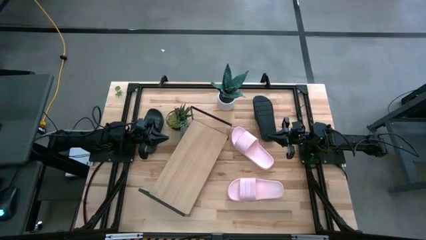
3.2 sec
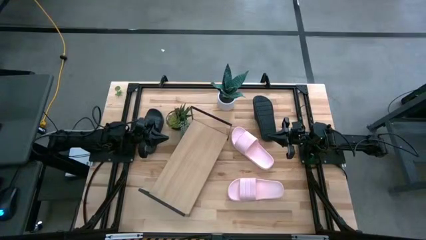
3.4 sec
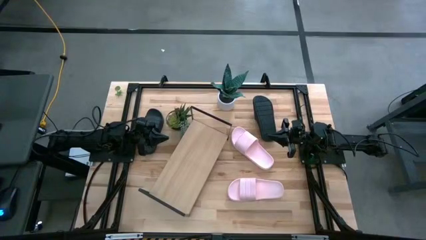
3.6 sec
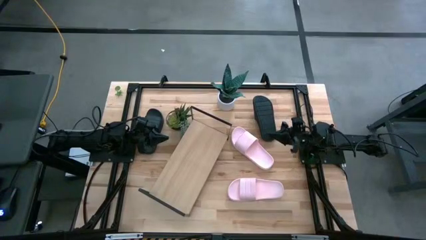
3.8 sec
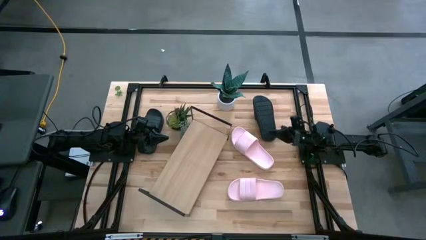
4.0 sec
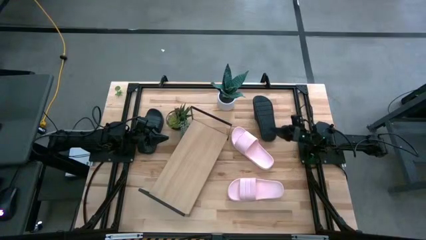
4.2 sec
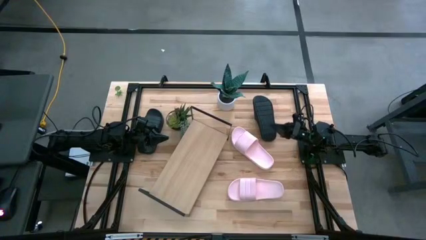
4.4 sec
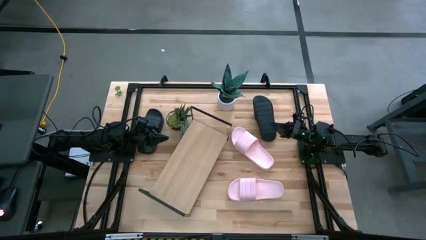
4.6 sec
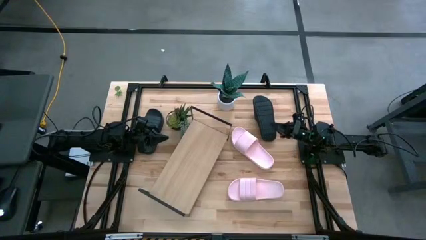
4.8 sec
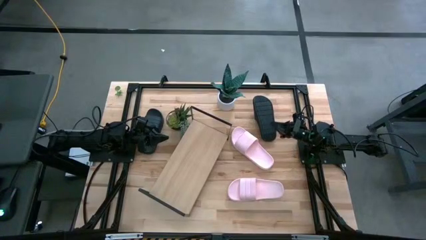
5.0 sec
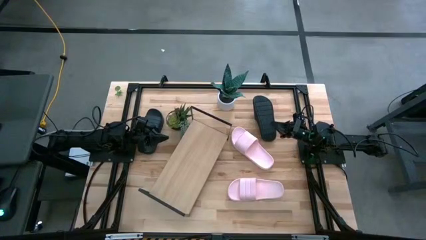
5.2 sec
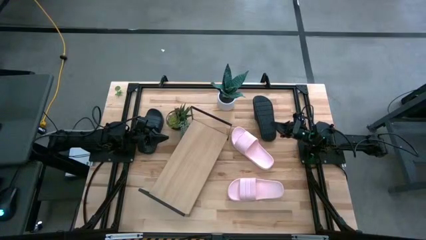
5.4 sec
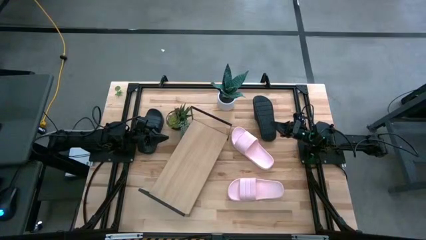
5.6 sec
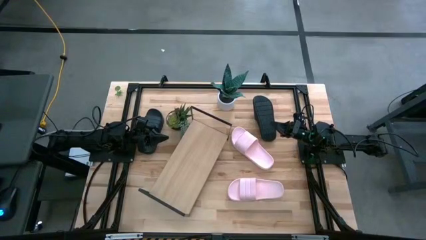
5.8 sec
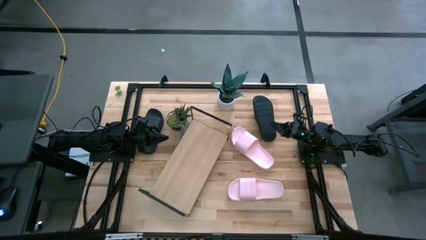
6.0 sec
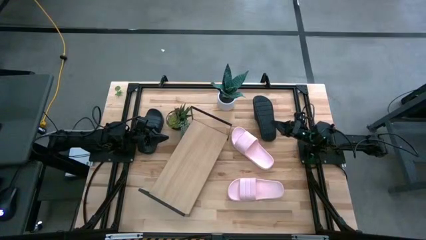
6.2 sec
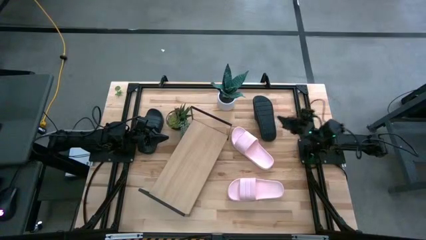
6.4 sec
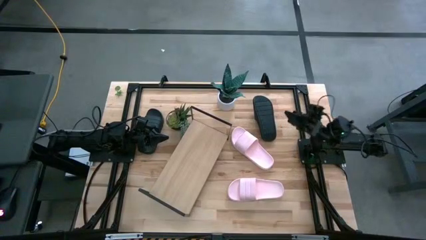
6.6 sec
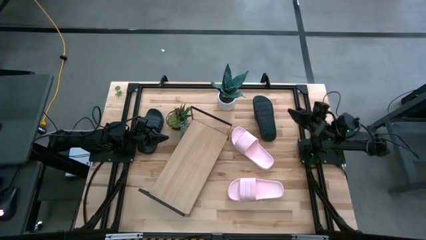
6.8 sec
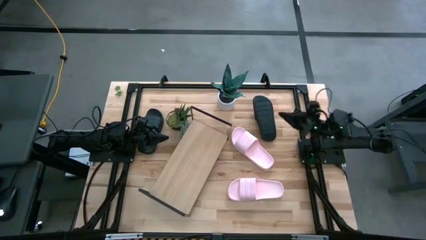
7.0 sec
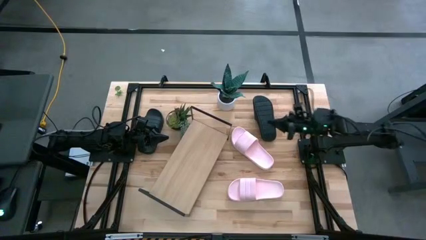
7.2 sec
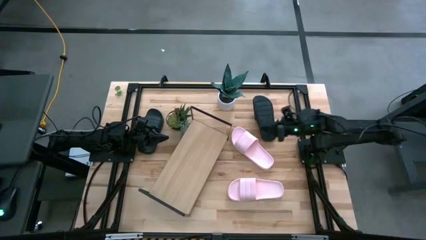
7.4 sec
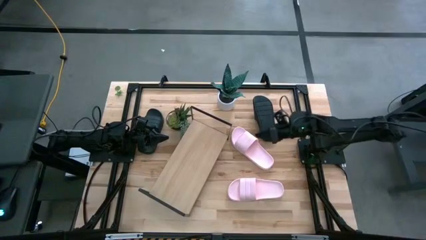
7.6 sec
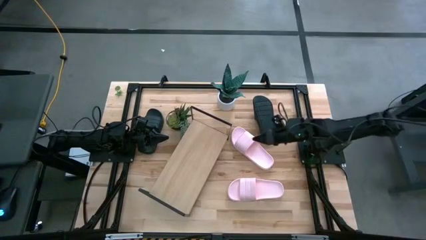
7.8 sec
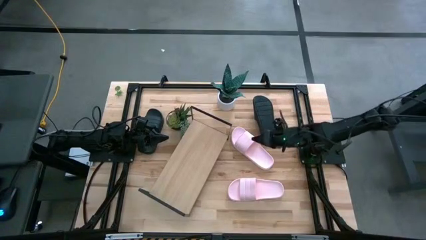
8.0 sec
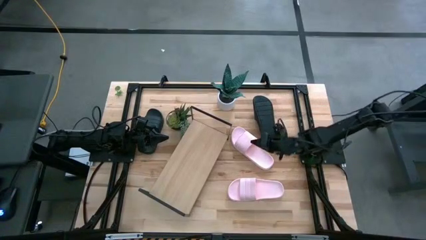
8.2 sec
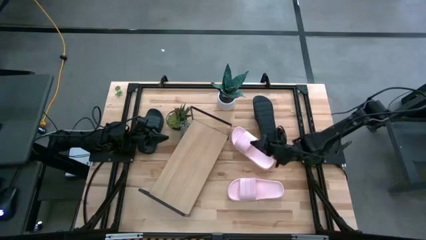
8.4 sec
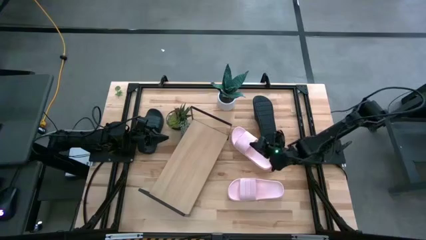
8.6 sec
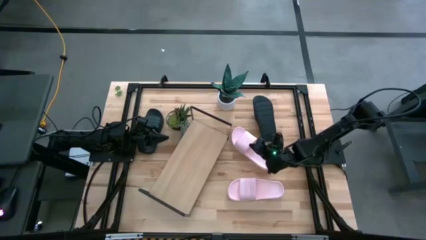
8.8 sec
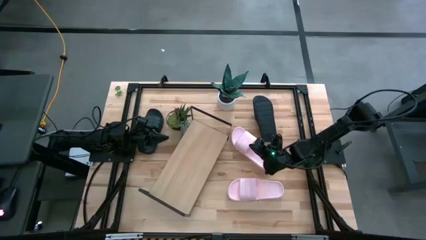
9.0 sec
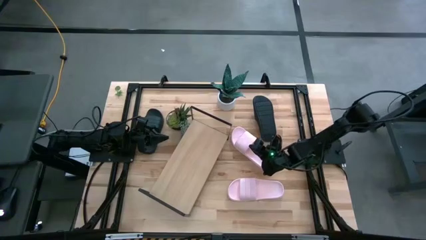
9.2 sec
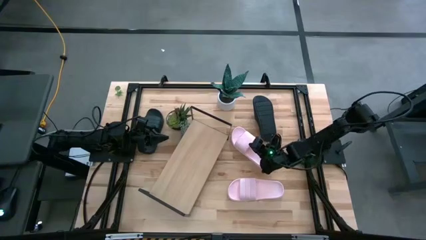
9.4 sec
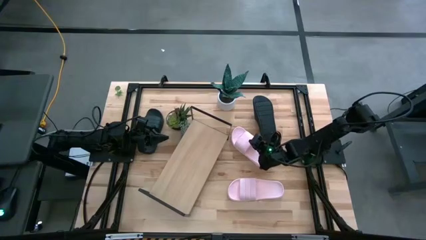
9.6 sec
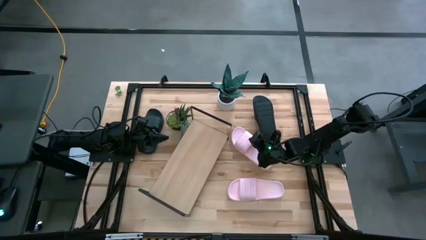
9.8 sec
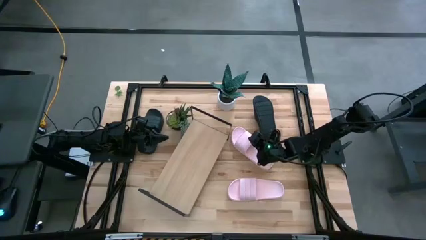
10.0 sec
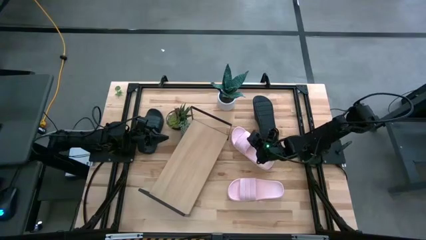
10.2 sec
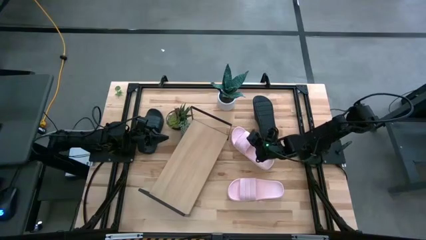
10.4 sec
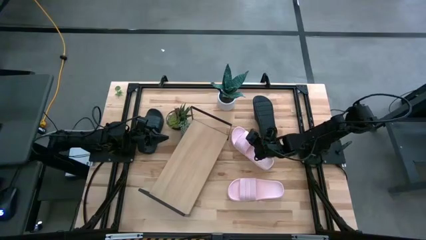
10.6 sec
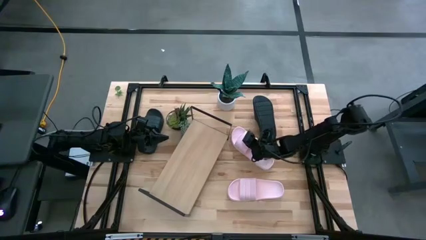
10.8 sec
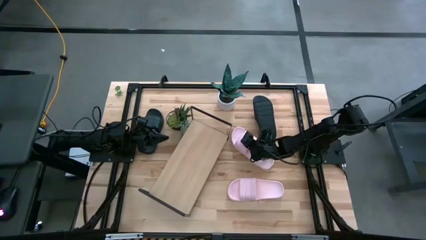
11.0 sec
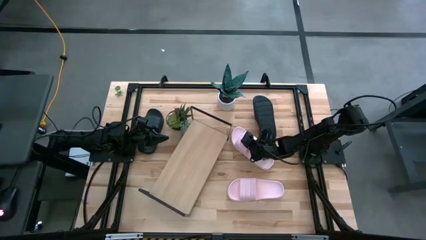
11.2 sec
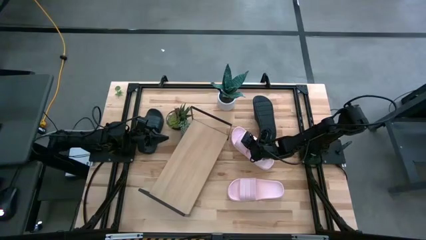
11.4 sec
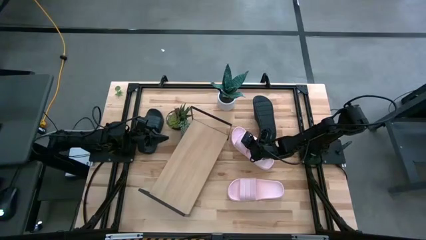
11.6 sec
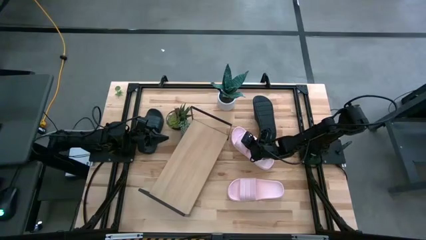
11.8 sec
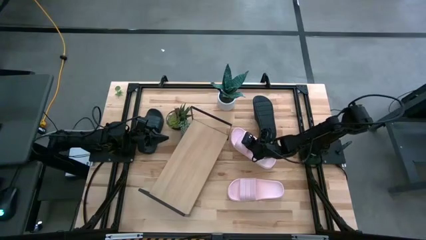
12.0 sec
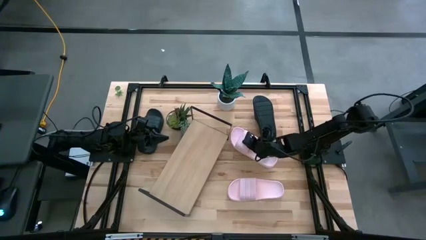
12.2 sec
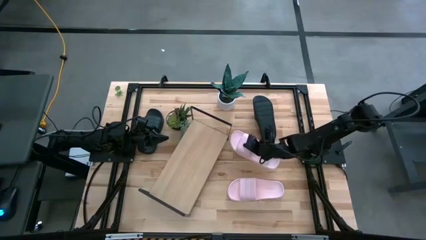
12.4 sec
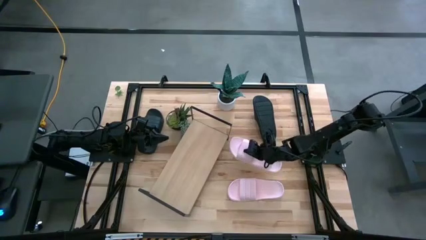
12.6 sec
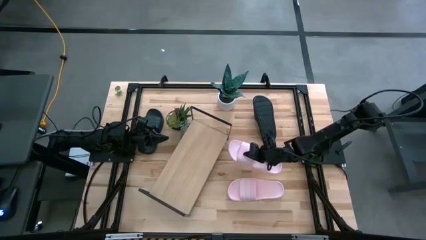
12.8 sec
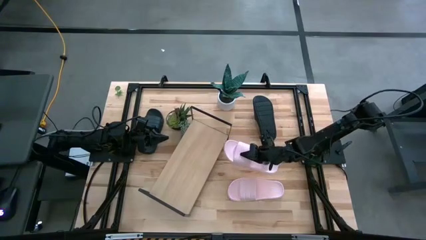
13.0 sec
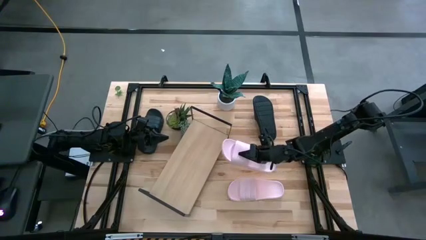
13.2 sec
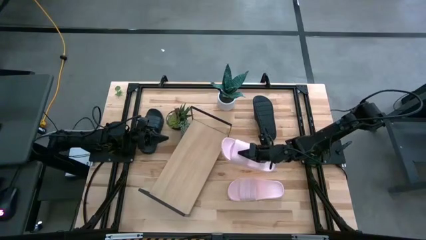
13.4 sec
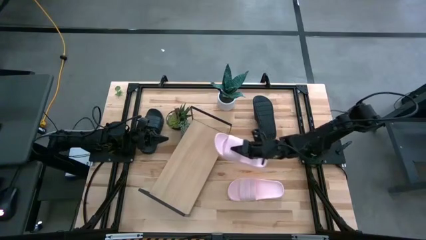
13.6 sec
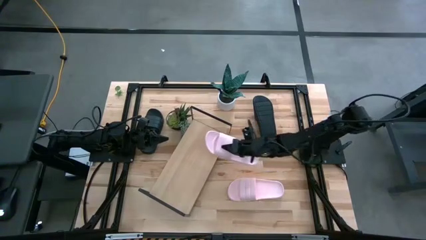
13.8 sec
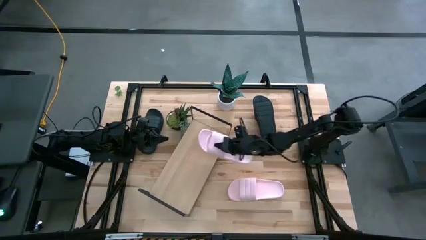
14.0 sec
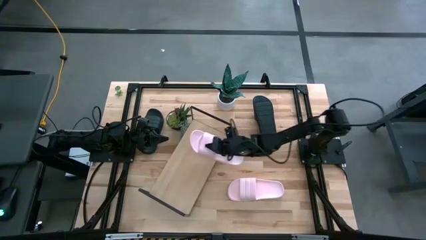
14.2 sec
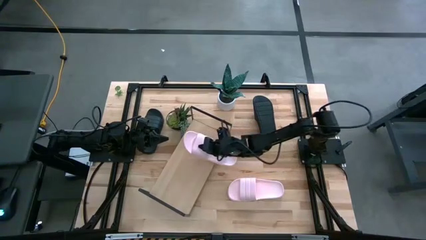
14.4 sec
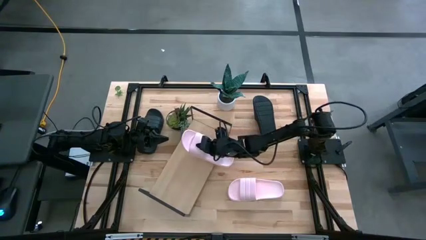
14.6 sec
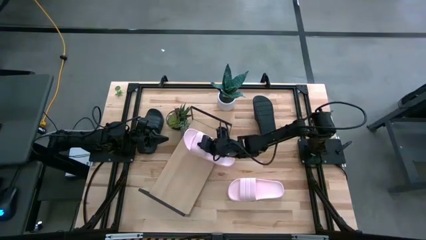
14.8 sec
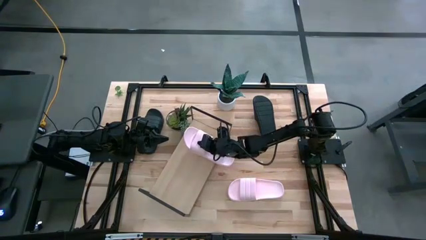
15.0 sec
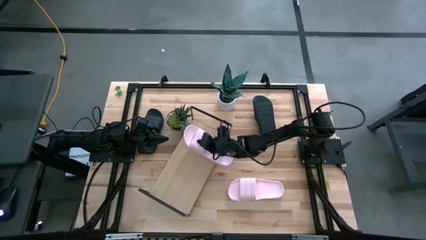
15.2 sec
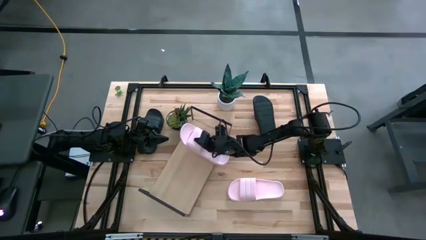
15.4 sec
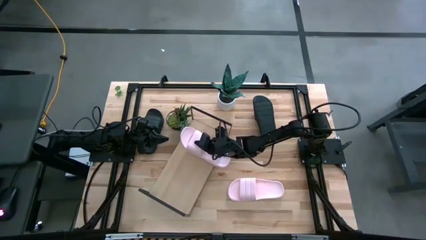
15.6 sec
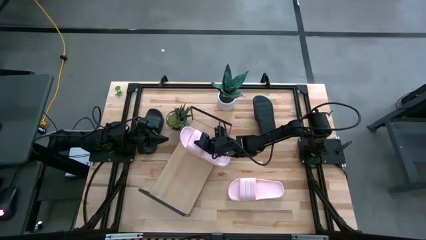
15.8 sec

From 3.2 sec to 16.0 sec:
Task: Pick and place slides into the shelf
Put the top pink slide on the shelf
